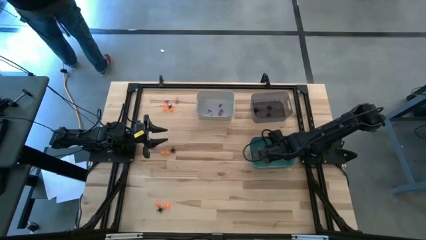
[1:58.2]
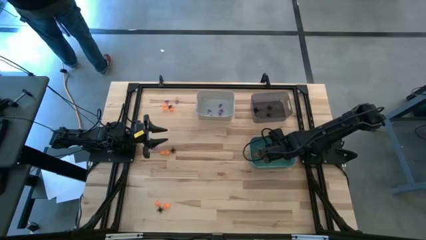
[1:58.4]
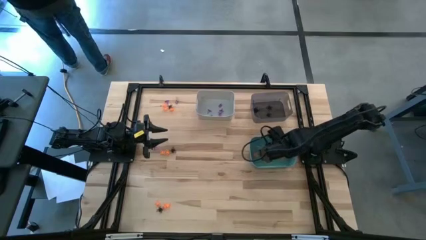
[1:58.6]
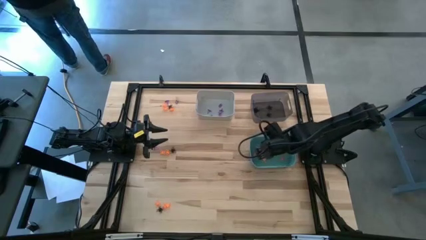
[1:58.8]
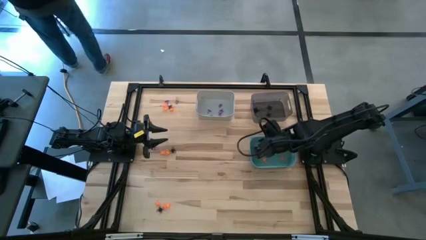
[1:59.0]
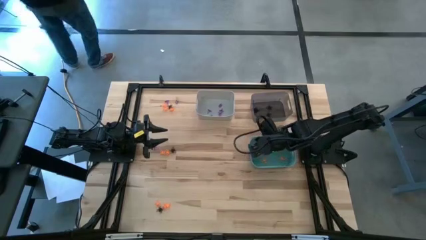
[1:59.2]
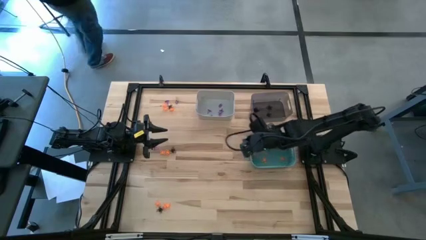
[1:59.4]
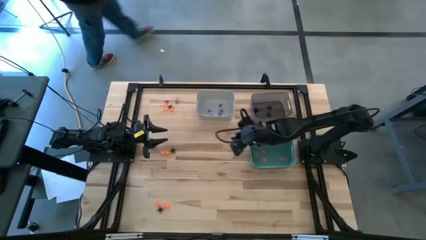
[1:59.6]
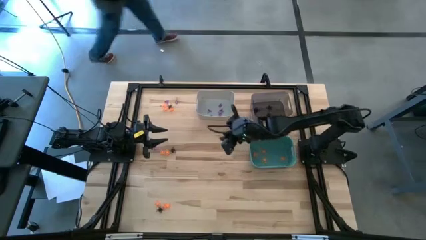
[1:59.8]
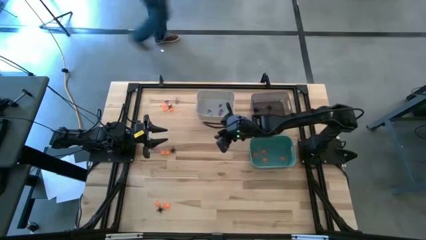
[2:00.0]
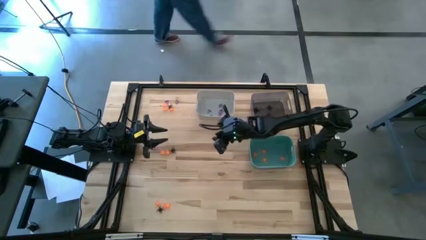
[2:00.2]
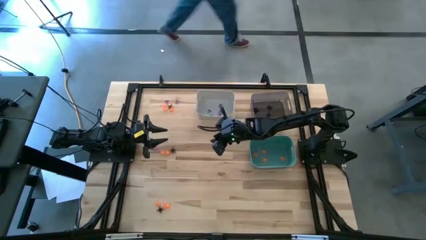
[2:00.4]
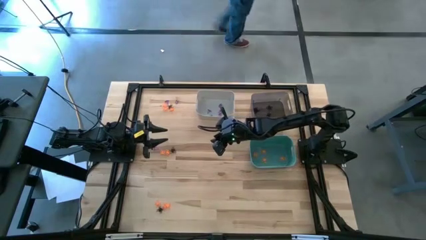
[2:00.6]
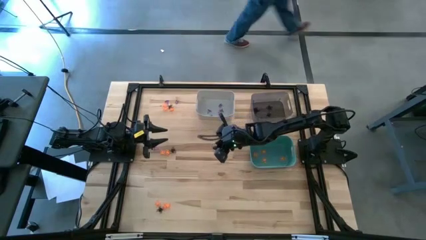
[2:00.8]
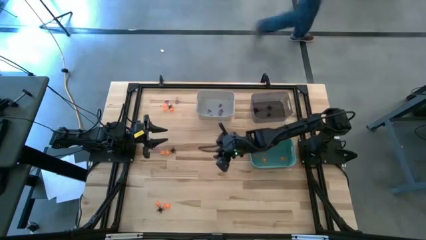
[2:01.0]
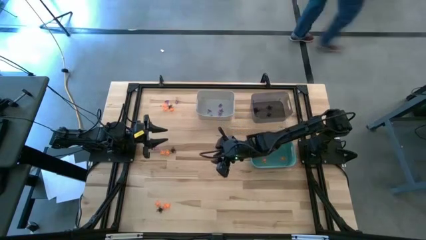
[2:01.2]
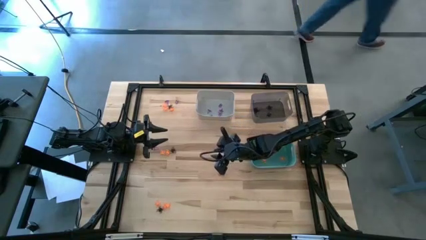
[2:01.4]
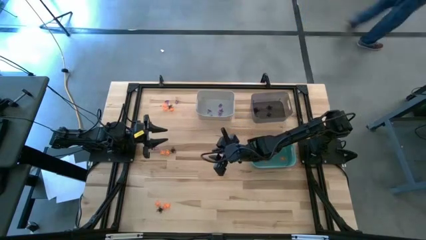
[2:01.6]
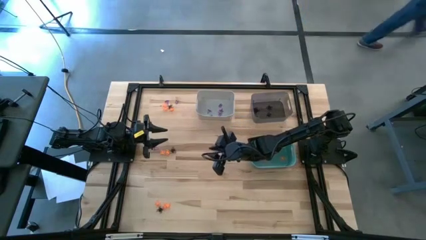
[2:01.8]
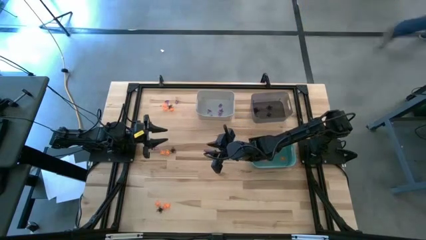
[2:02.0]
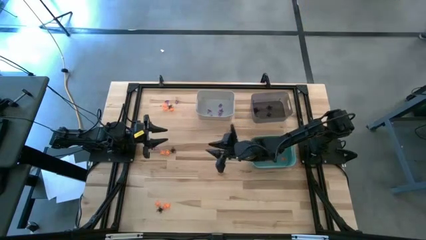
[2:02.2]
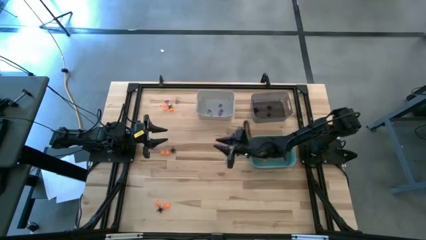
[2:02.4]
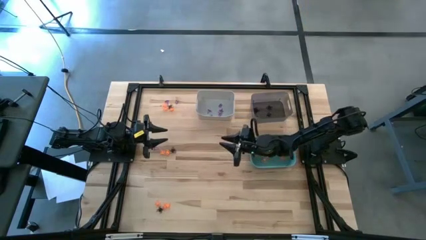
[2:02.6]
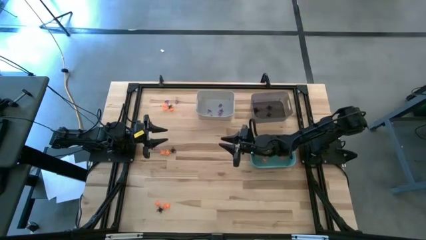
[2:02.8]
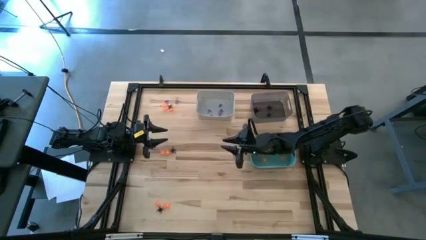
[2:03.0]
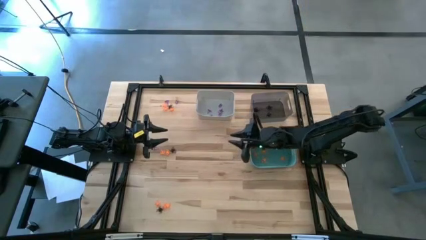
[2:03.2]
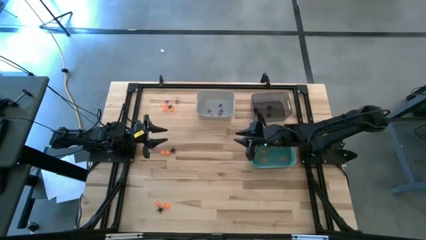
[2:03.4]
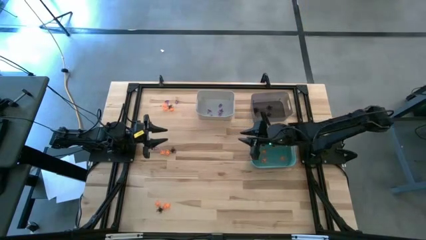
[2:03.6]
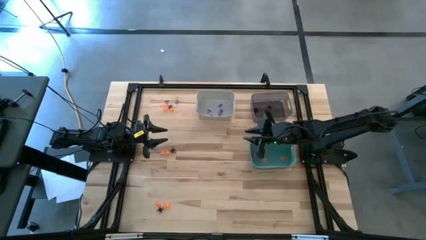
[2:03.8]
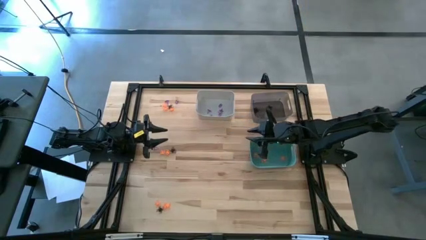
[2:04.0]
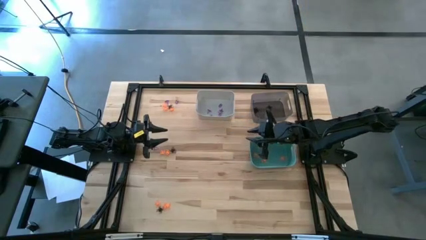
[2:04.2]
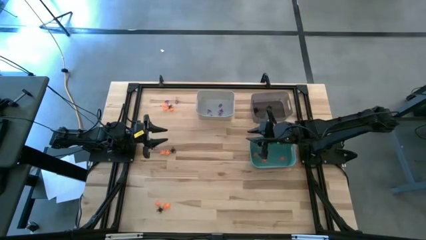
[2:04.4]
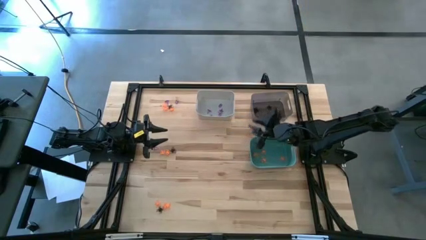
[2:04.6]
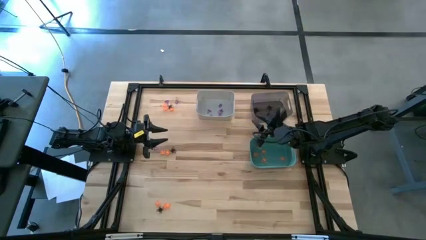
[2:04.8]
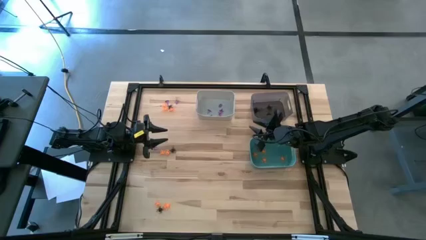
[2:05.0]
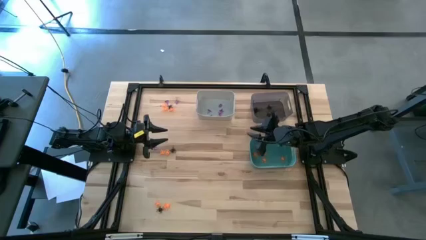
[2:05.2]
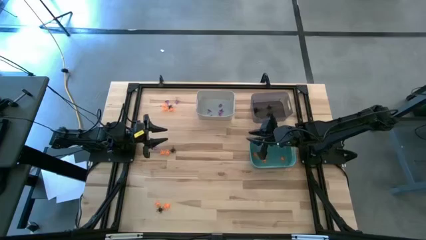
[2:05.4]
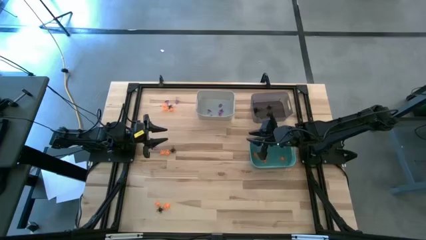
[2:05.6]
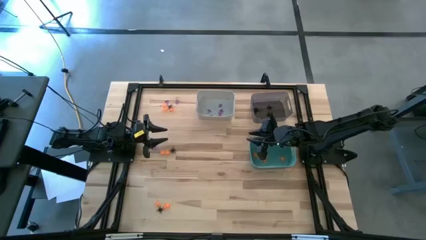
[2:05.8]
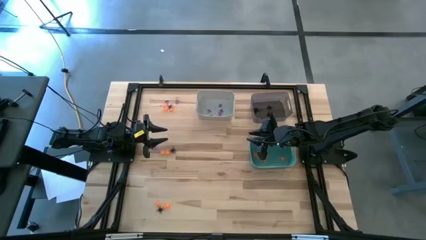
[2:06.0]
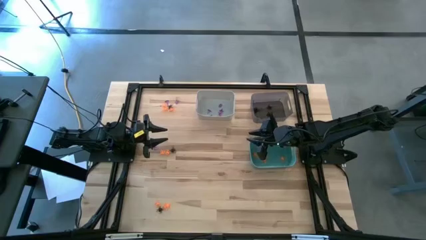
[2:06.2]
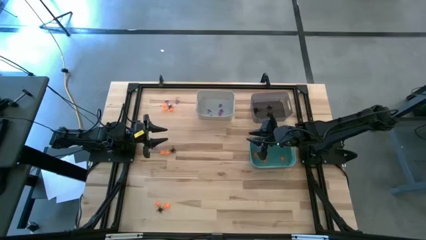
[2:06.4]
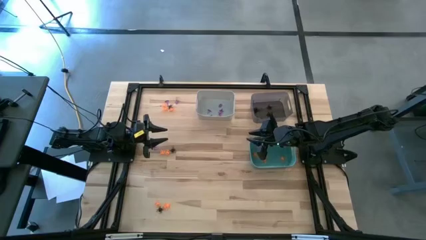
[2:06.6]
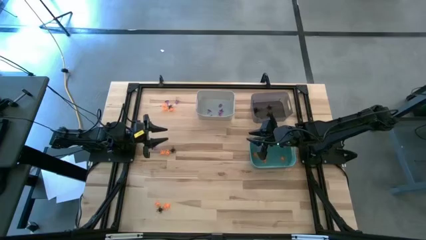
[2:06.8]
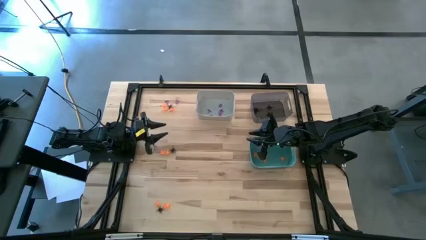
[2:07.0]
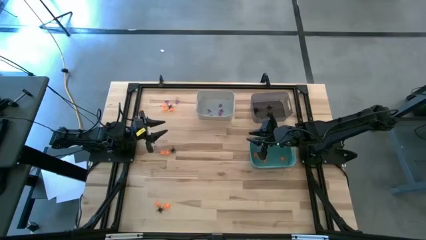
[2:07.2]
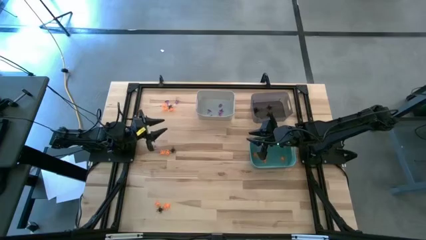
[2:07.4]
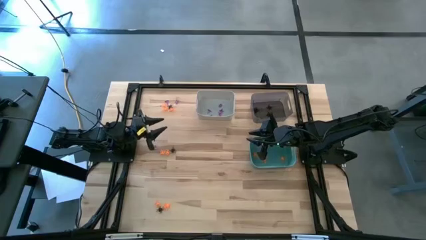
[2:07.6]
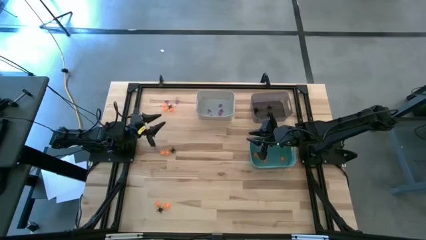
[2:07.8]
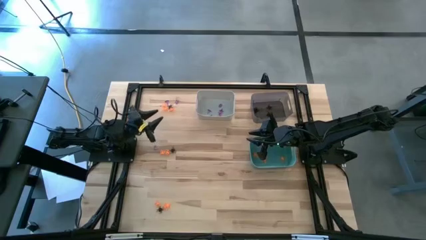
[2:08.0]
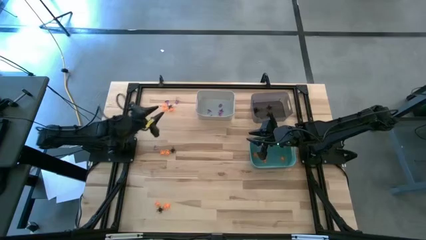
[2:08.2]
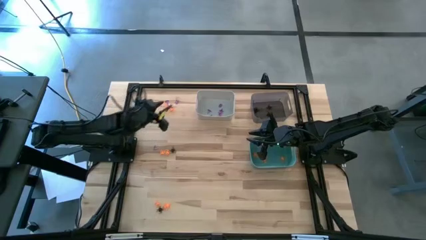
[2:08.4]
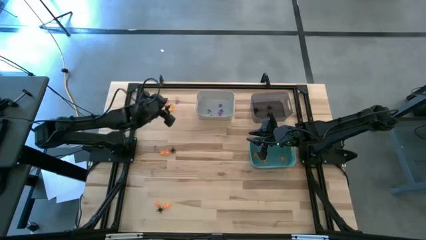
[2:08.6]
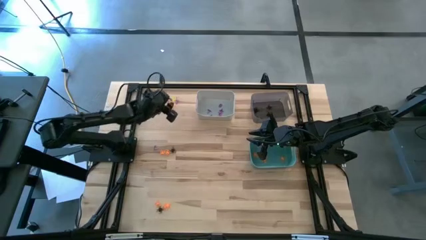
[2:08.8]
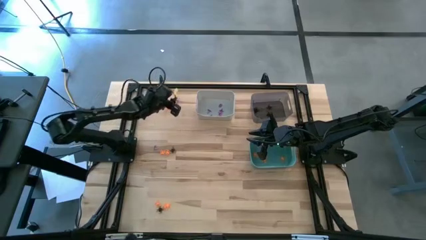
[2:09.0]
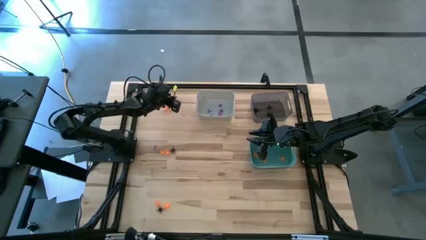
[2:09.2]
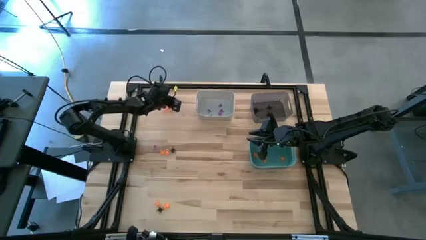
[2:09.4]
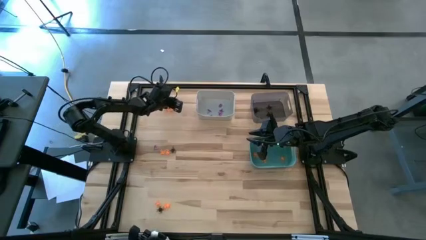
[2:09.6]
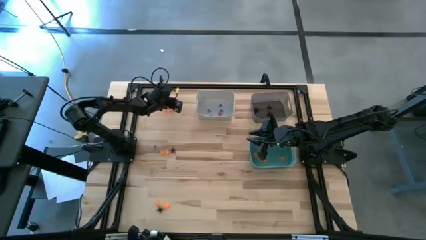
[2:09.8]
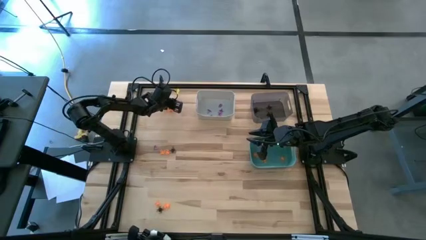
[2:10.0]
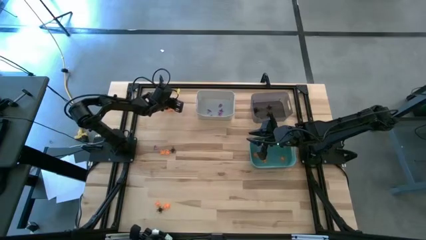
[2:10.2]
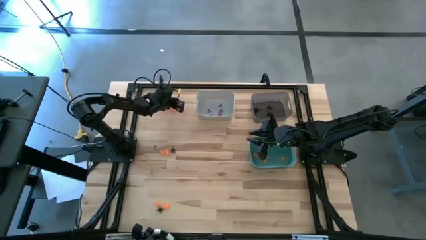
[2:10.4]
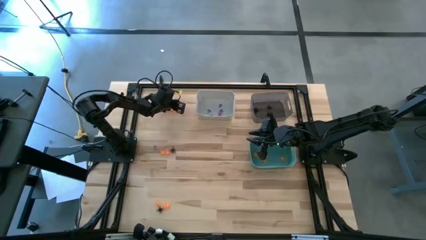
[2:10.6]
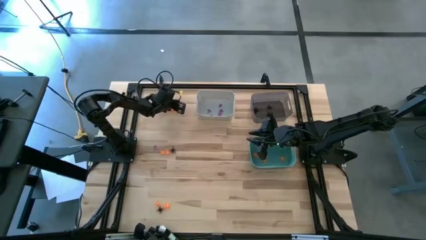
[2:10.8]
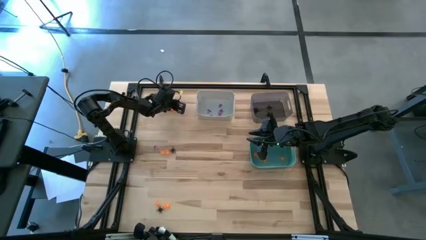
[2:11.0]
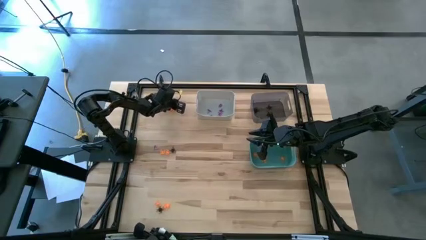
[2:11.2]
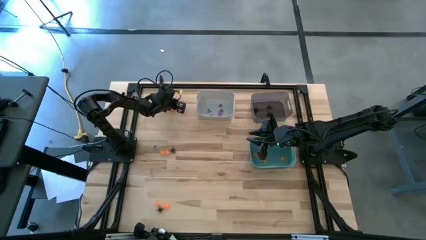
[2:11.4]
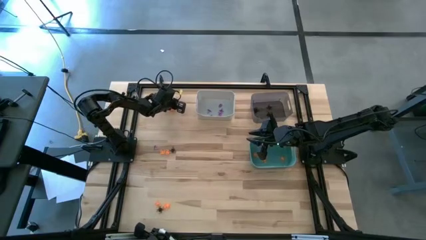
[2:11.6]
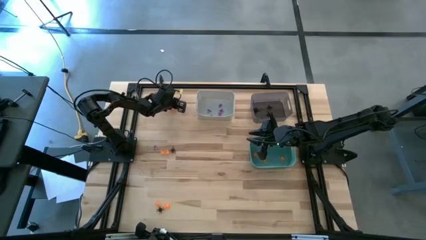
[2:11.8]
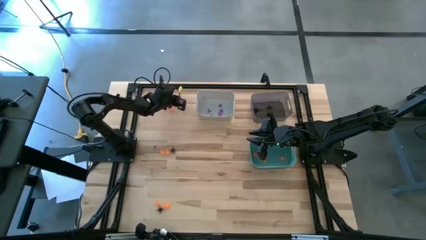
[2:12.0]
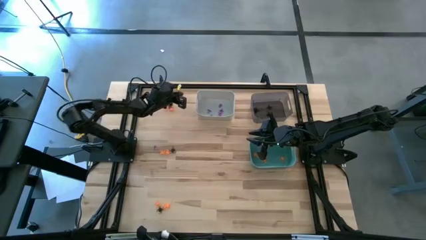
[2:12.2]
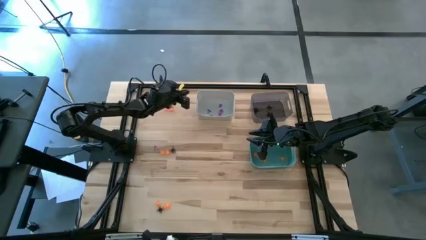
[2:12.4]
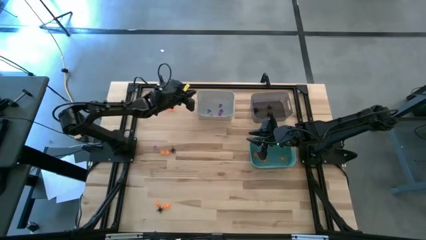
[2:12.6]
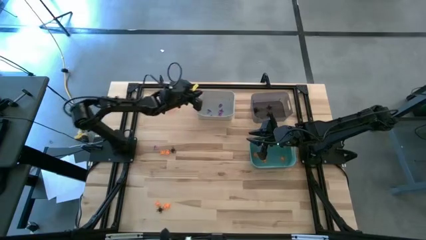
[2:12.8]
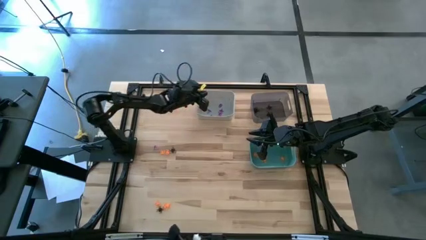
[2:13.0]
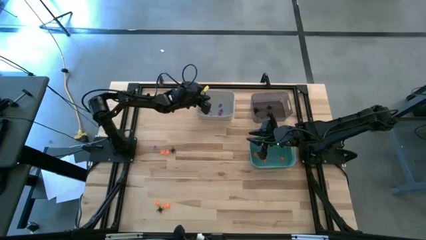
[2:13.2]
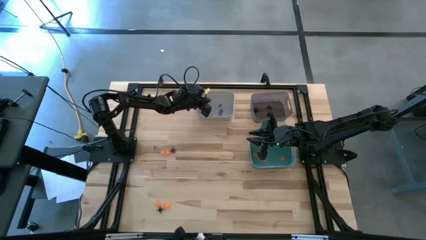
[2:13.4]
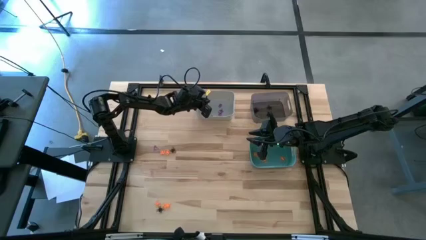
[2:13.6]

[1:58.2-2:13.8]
Task: Sort Halloween decoration
Put the purple witch hat toy into the white bin
